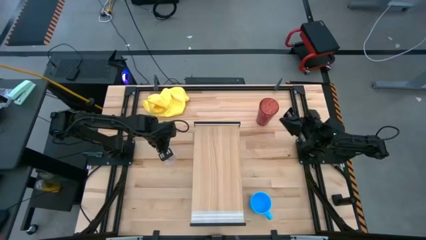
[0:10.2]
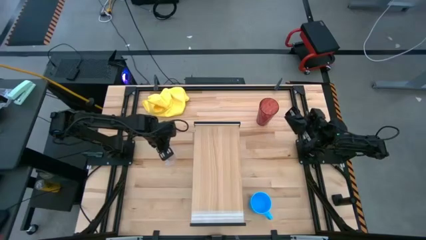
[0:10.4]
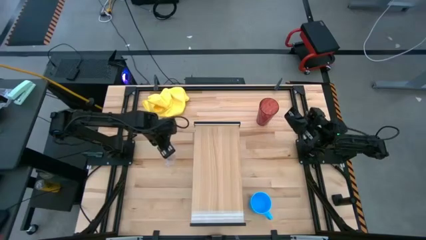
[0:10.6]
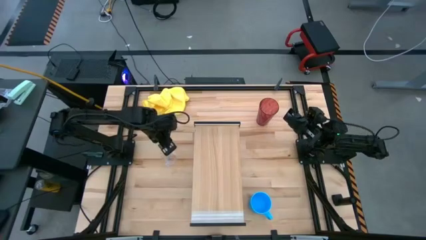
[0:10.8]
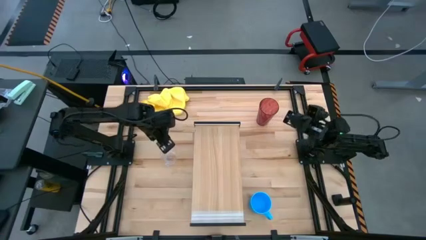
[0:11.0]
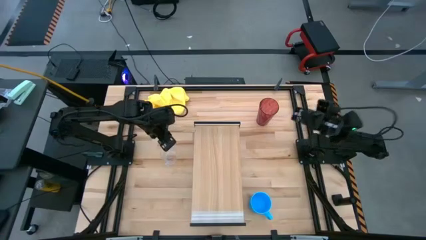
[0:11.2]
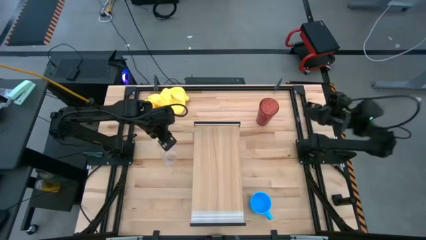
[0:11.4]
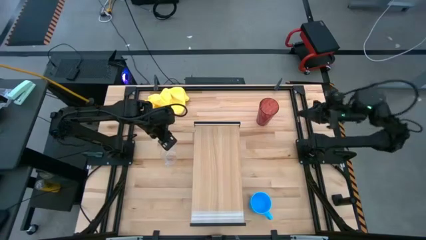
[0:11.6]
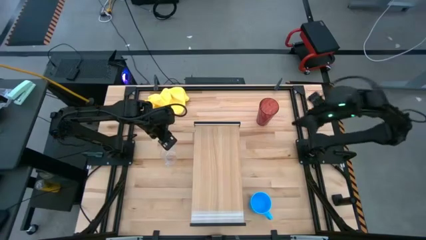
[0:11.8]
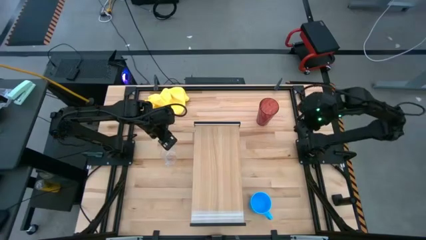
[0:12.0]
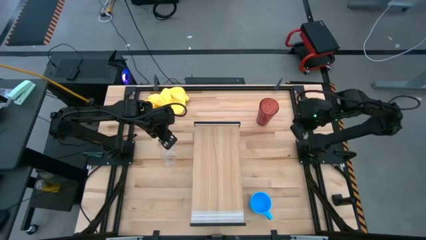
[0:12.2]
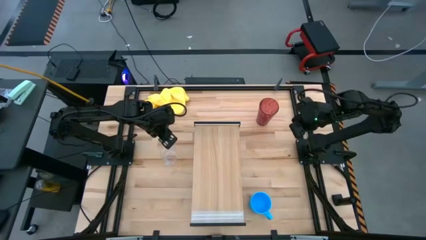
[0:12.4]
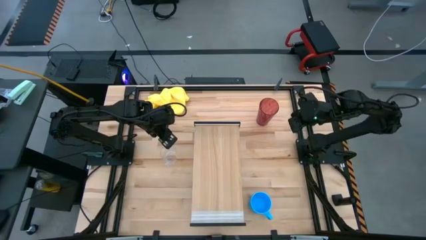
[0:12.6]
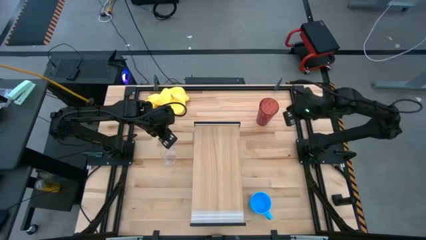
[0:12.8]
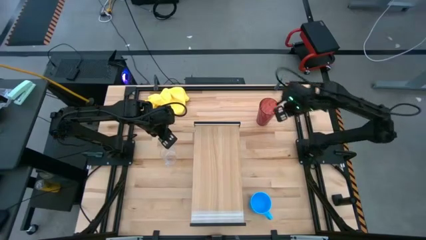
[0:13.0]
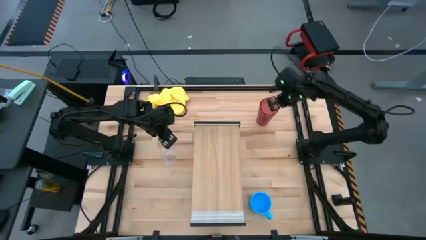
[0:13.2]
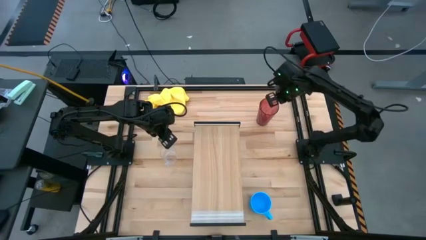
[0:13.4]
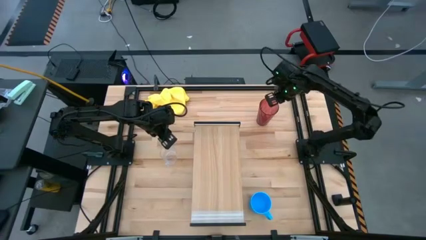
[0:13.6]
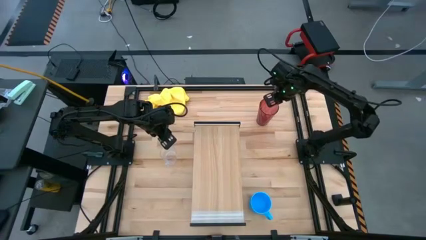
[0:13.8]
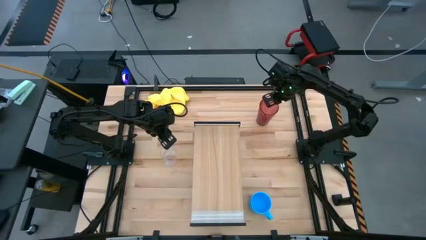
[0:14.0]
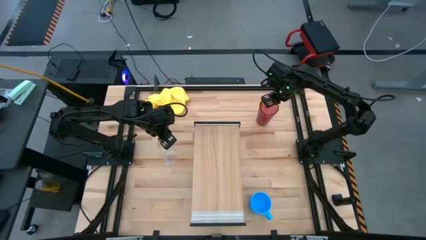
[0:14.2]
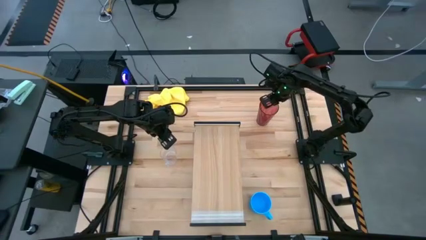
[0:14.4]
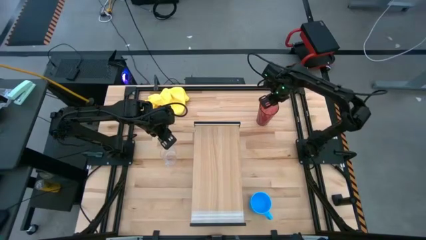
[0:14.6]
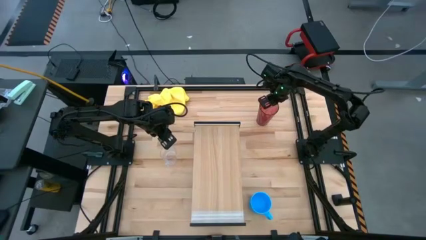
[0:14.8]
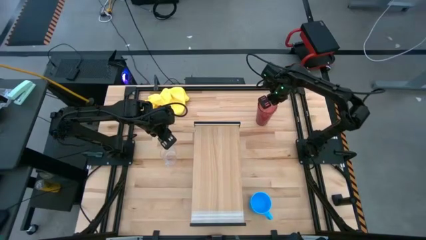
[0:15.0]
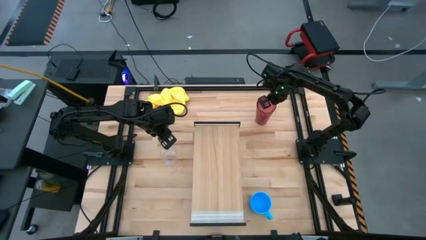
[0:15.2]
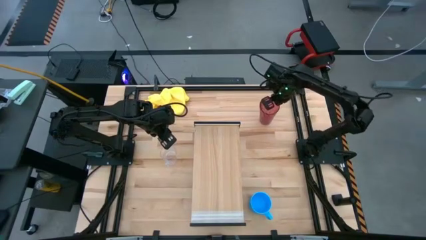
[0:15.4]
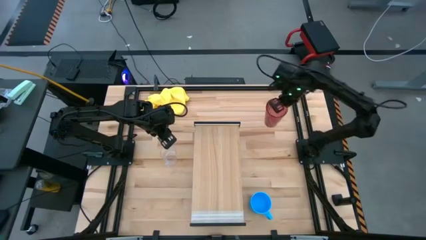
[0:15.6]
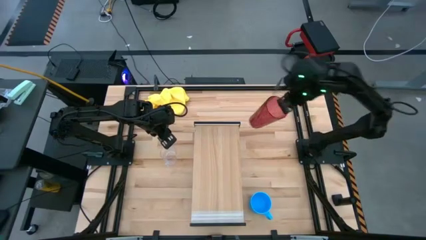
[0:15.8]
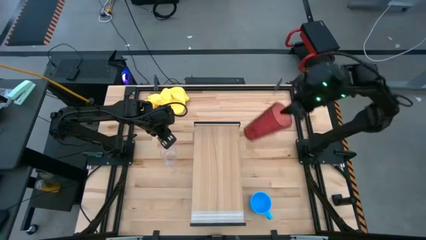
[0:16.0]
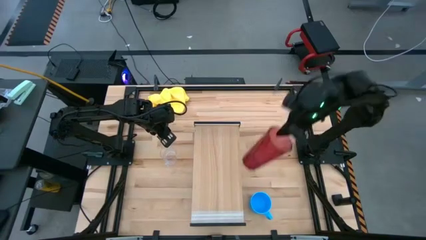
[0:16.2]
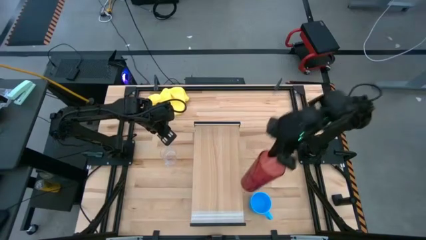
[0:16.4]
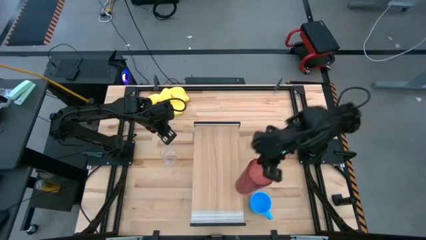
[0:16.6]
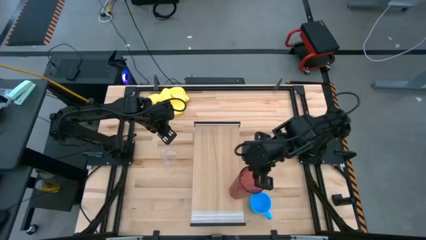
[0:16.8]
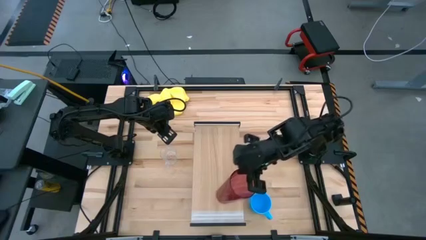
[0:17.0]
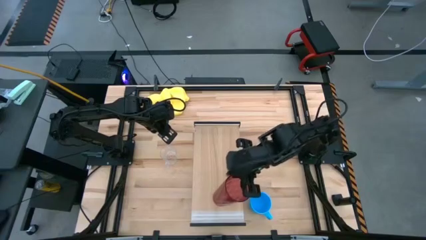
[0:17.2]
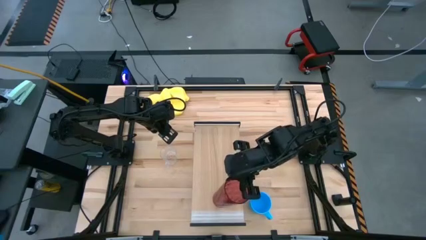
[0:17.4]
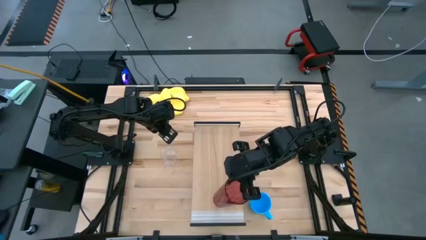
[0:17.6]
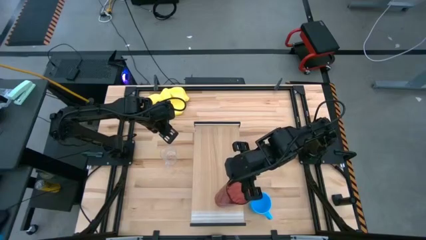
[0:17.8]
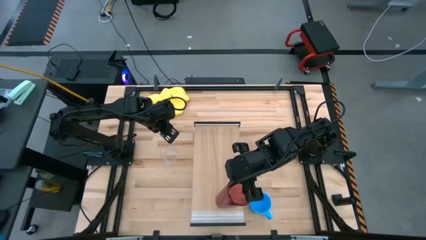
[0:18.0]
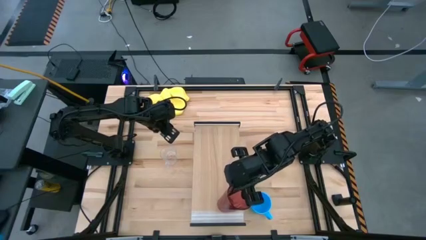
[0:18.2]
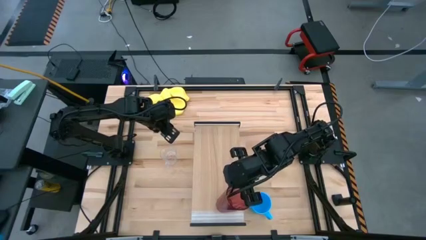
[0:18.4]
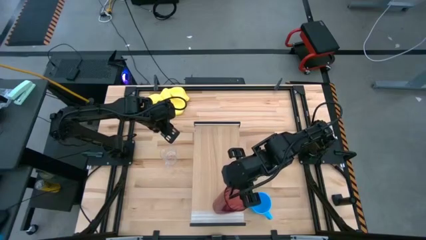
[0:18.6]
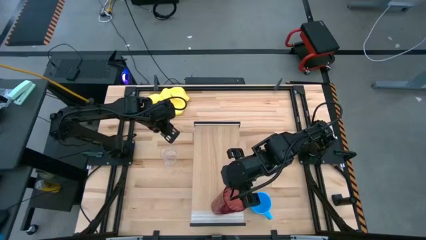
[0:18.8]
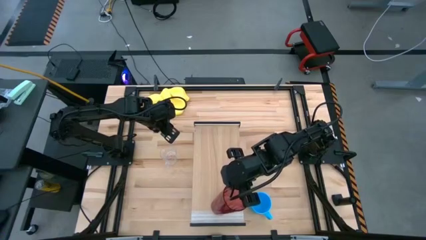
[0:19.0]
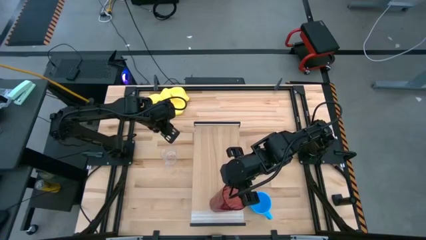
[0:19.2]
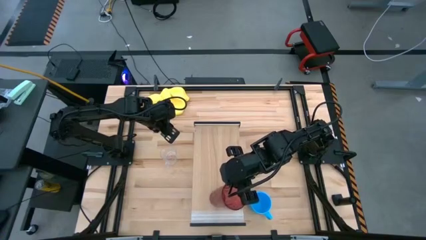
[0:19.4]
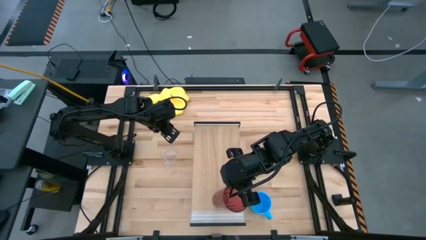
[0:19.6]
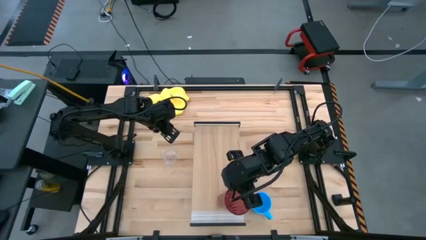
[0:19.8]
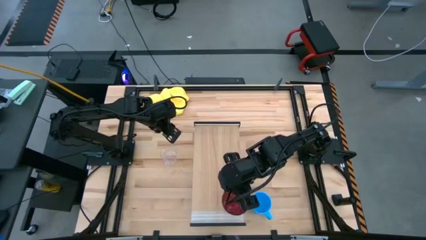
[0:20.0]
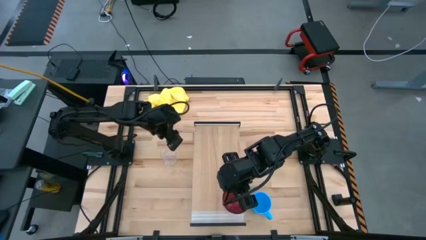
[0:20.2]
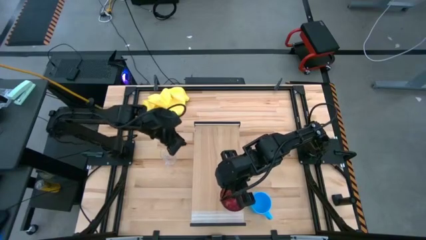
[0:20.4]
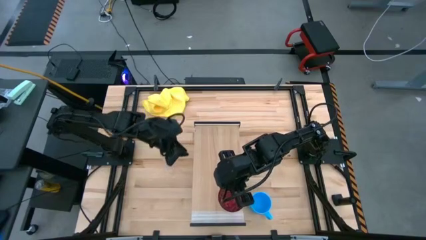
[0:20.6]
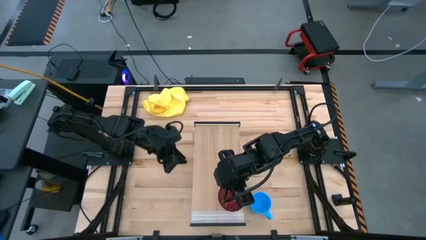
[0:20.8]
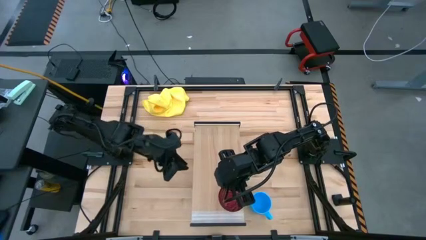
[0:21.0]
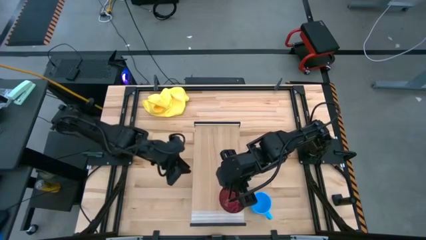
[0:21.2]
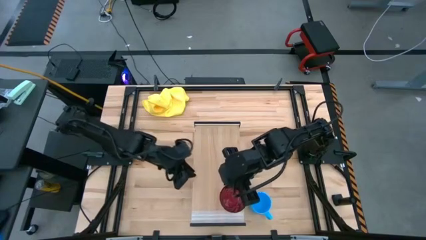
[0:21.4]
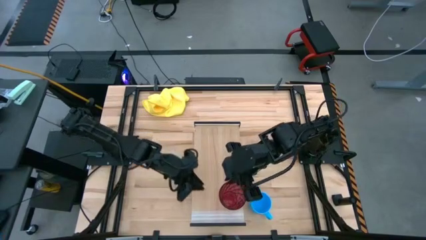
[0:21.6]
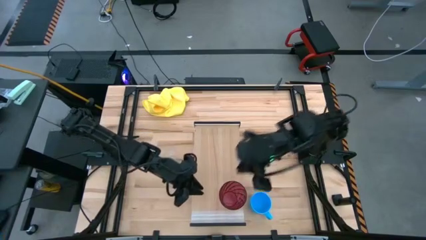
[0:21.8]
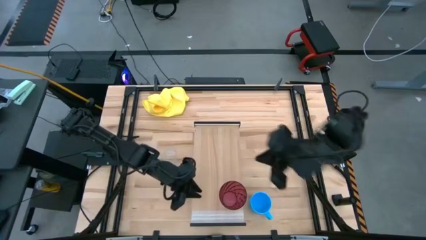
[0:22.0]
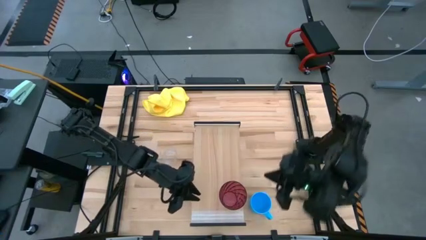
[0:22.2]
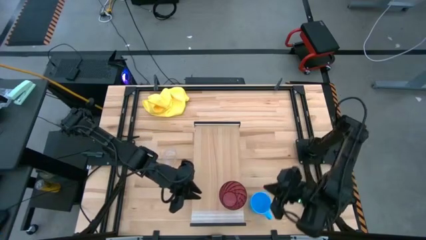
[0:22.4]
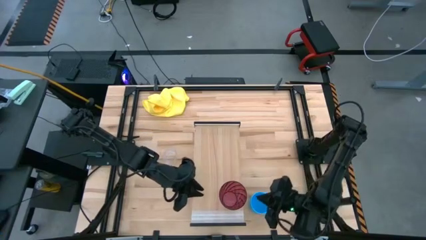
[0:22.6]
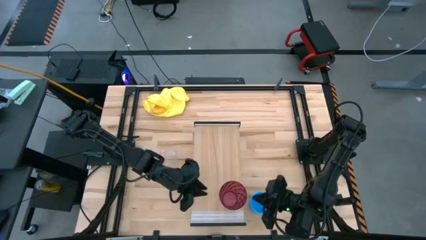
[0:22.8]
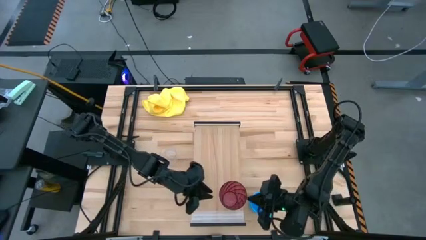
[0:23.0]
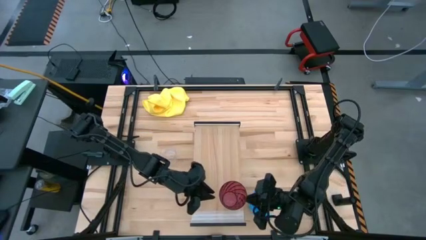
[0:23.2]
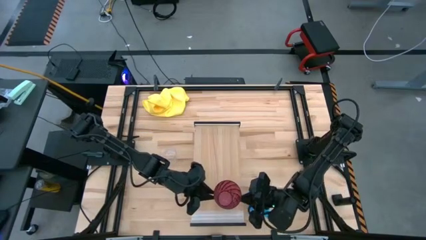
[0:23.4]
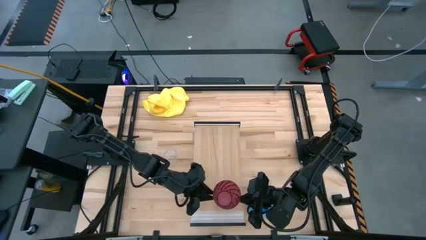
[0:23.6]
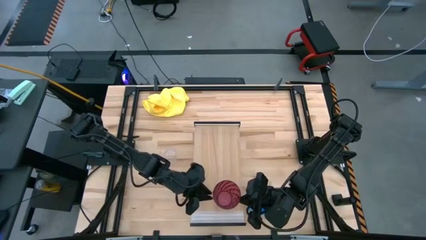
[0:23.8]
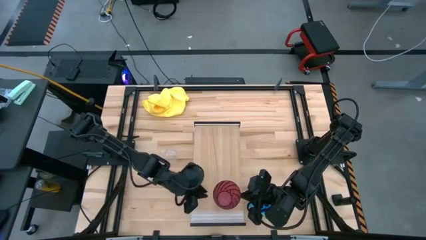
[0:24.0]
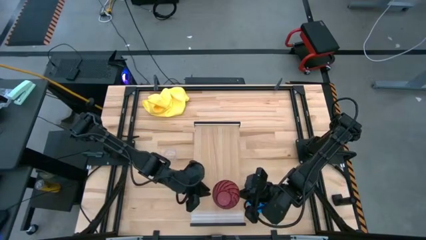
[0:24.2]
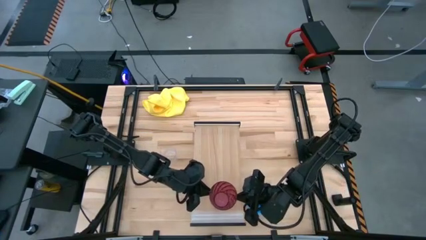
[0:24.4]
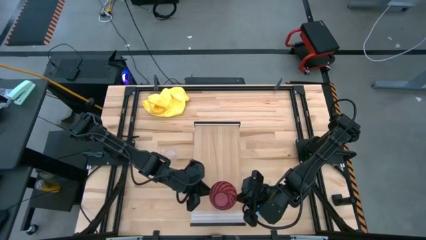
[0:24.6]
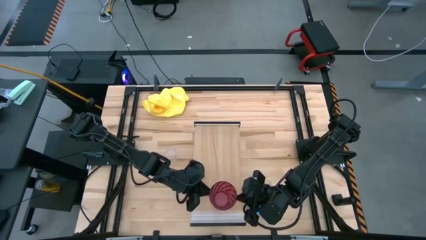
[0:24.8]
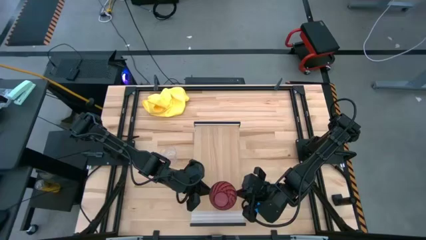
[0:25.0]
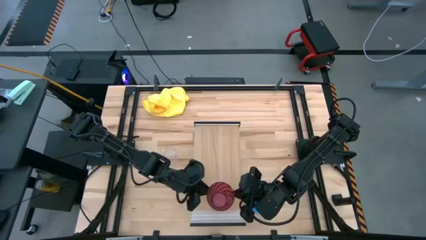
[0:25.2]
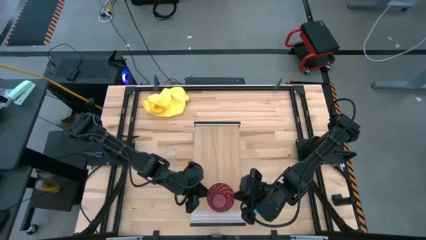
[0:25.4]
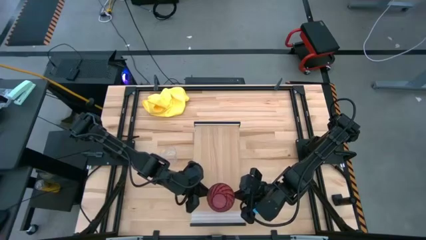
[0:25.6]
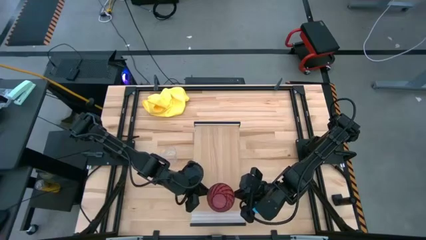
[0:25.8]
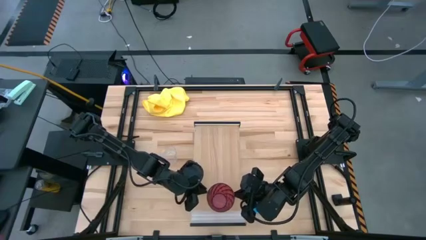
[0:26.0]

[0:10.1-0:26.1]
Task: Stack small to large cups/mugs on shelf
Put the red cup on the shelf
